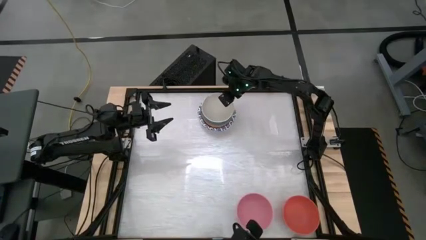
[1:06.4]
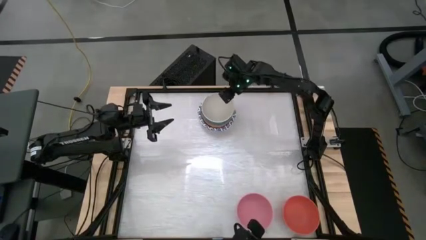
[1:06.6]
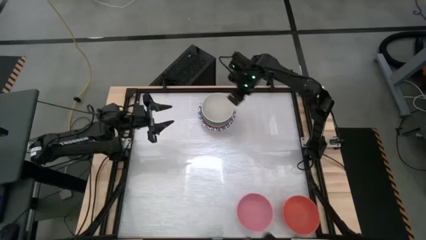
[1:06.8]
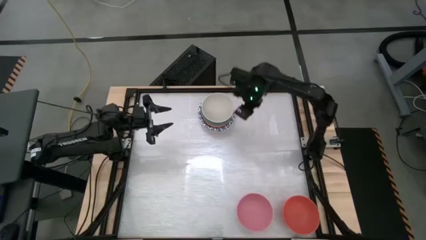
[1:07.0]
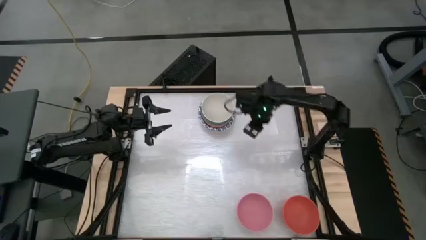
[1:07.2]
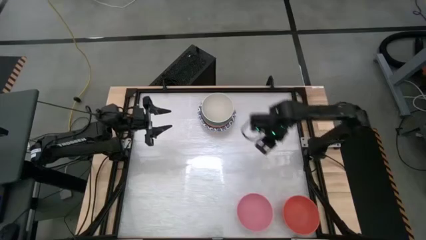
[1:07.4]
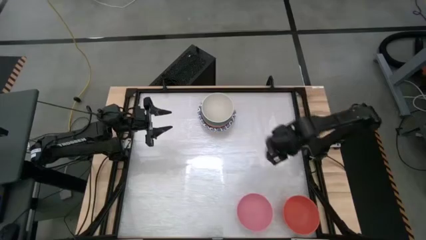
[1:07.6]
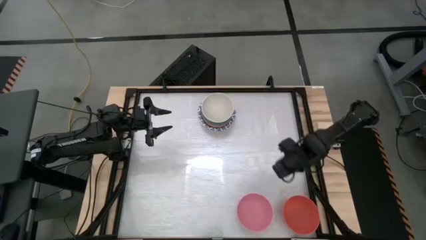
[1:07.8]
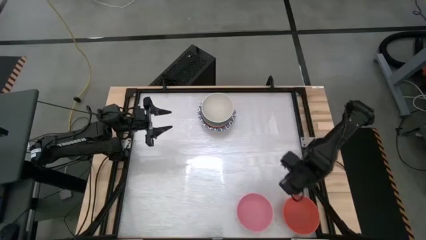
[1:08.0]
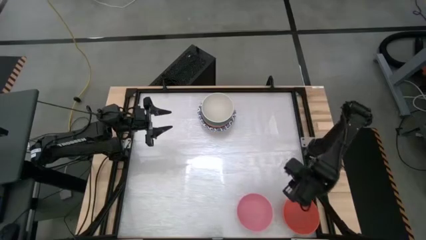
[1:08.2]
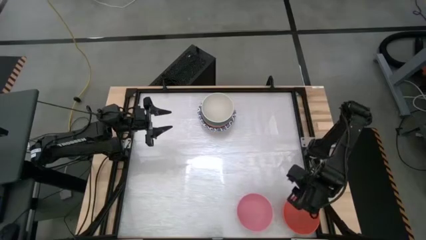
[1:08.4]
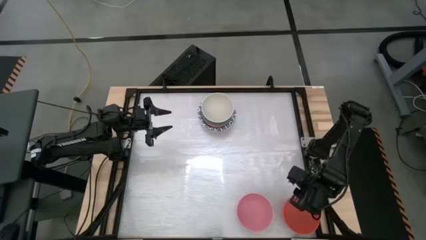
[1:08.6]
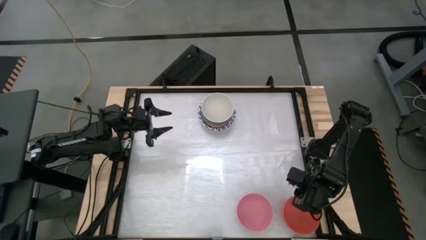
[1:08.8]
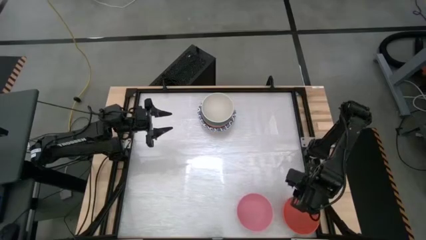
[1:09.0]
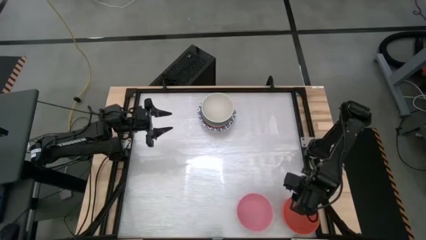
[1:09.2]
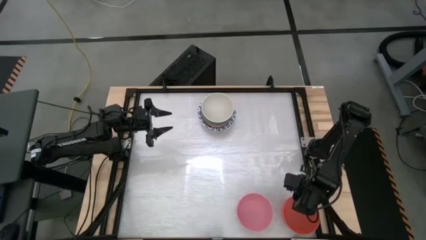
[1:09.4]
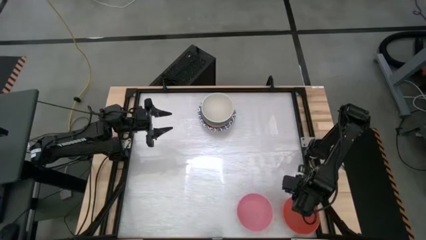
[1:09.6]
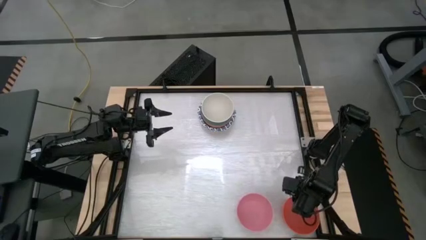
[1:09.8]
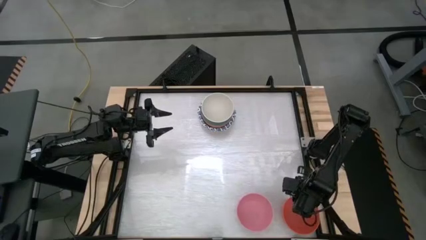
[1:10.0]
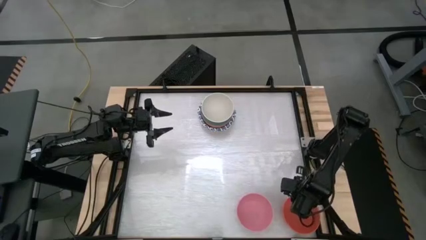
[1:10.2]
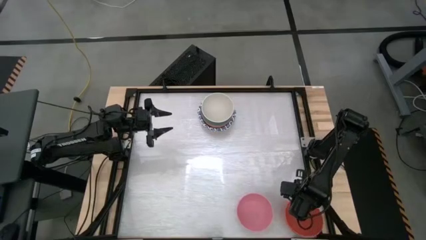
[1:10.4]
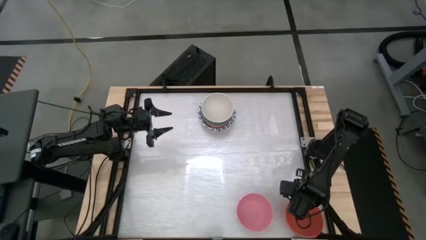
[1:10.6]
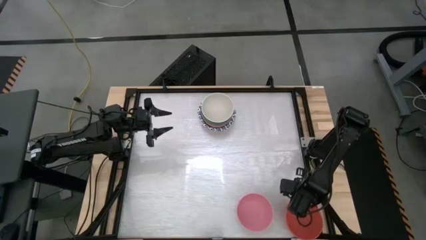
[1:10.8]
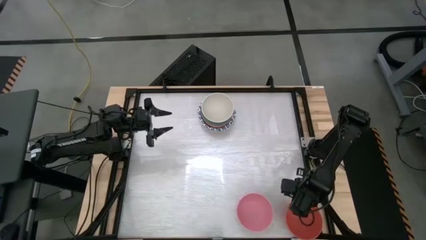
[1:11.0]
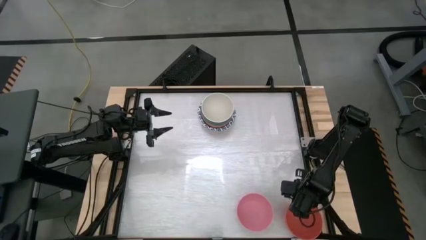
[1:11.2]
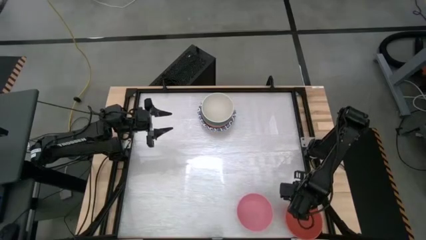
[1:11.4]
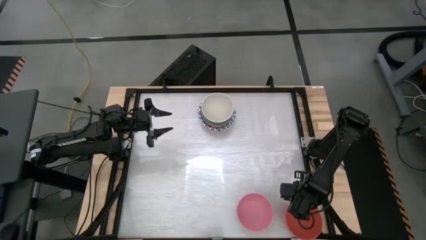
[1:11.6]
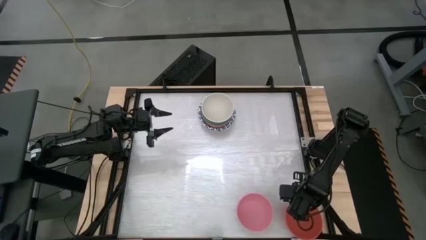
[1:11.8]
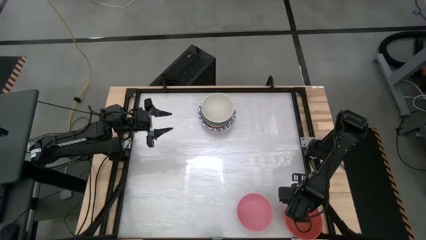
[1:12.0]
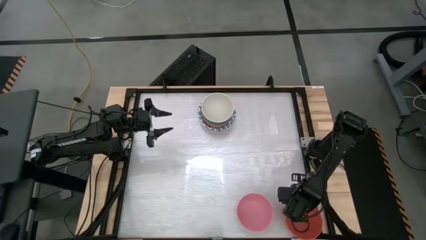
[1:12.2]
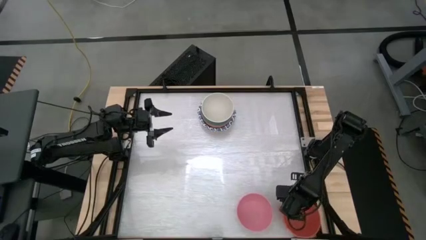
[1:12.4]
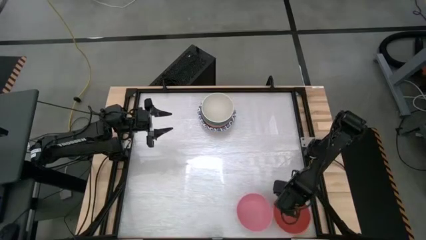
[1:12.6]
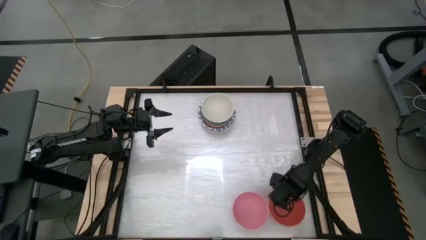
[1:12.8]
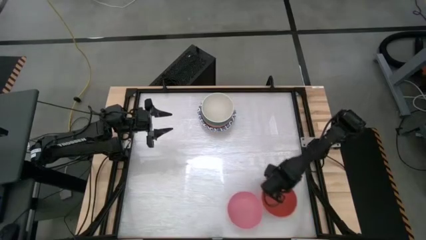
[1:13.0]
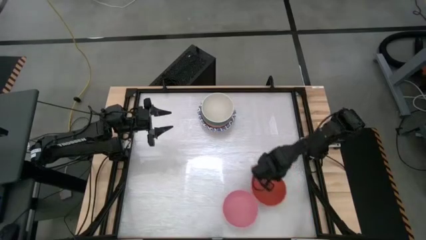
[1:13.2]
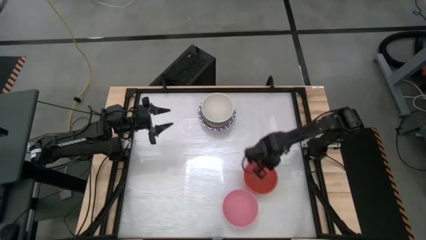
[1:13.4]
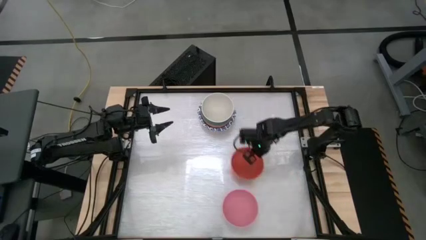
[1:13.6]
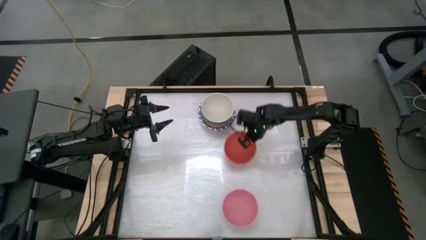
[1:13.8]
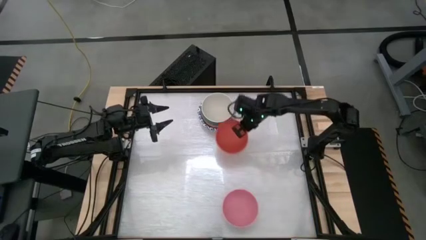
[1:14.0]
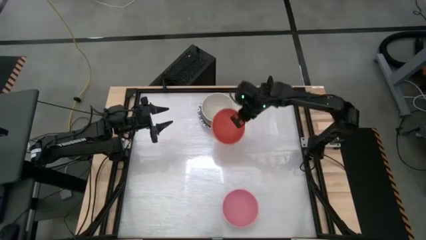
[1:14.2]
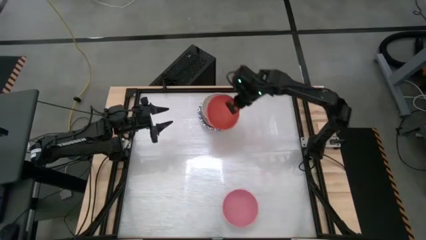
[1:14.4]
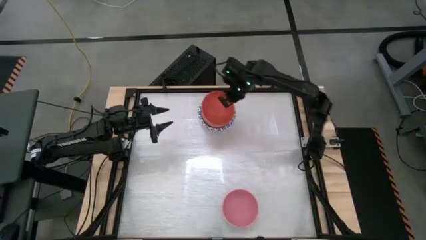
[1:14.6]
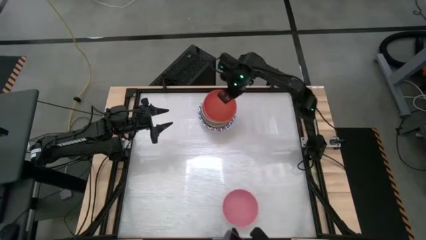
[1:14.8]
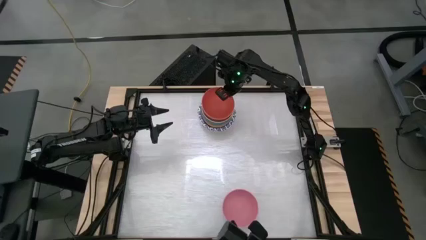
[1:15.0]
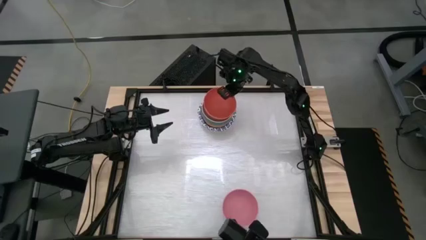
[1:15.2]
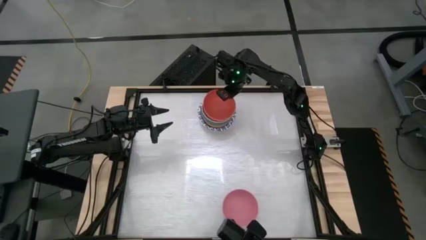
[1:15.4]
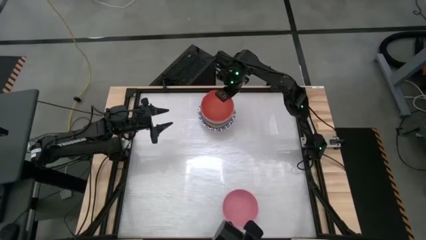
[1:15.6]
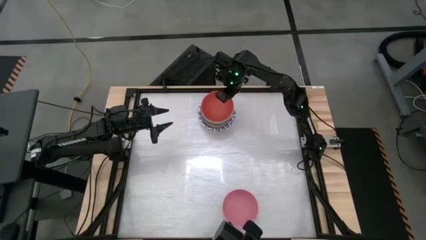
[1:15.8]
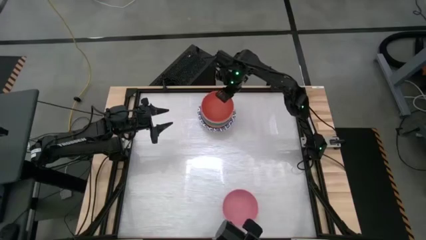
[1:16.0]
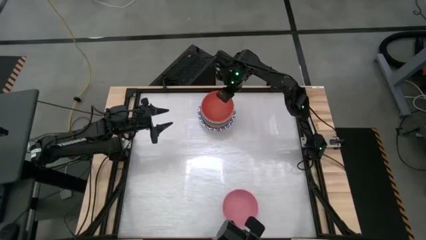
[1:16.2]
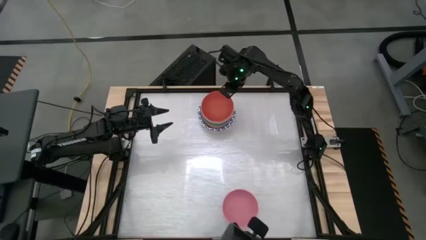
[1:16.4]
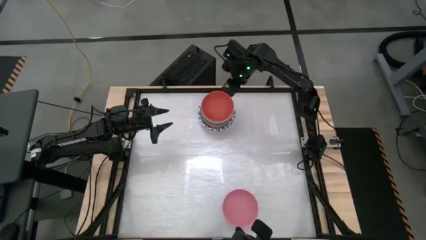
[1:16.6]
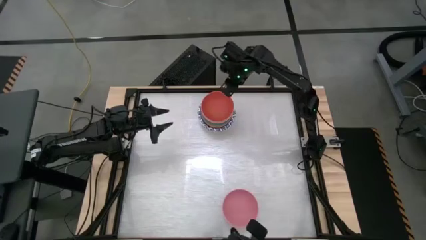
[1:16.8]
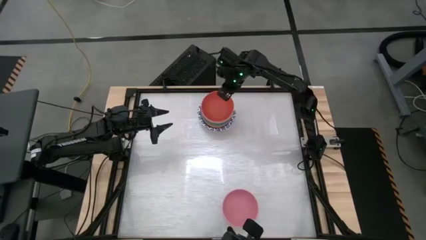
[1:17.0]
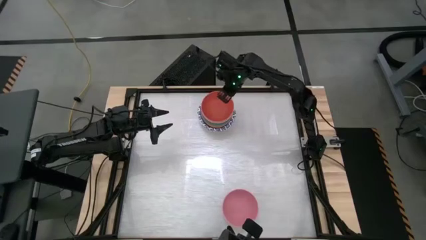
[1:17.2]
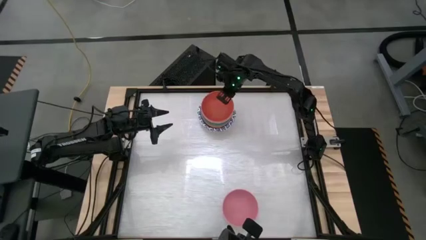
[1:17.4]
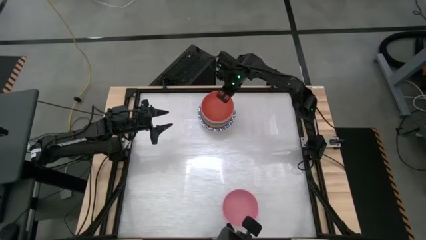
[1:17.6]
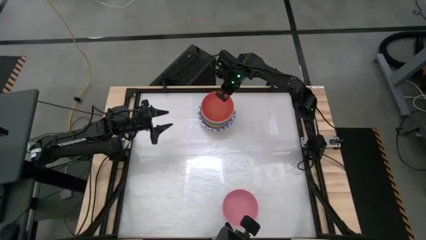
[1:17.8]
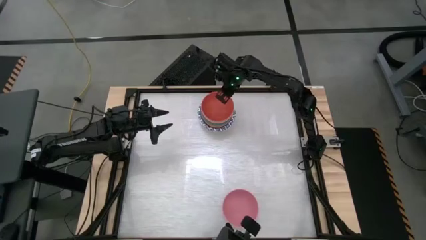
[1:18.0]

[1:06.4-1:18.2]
Stack the orange bowl on top of the white bowl

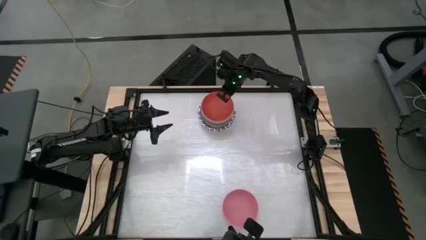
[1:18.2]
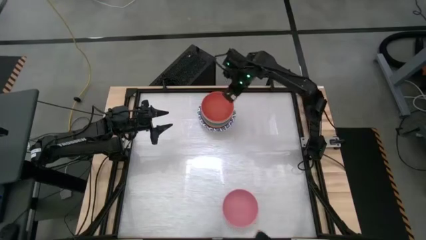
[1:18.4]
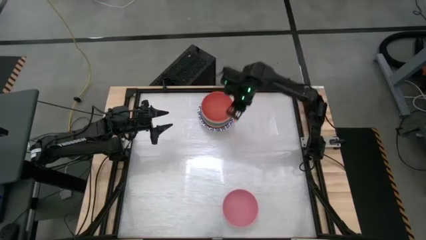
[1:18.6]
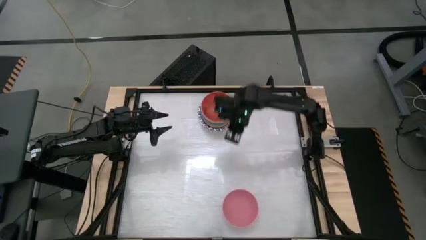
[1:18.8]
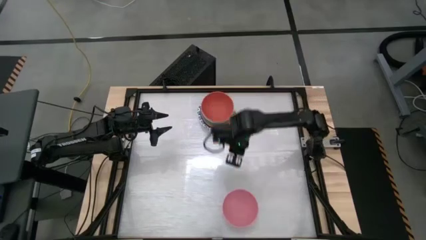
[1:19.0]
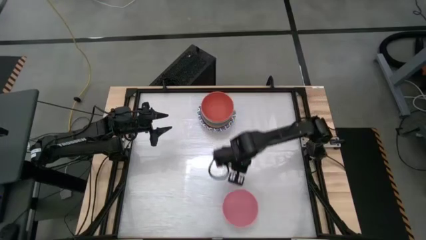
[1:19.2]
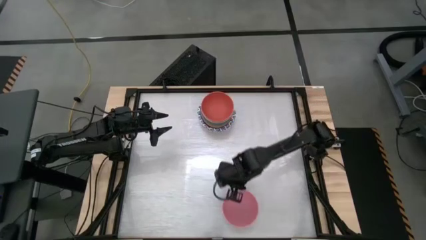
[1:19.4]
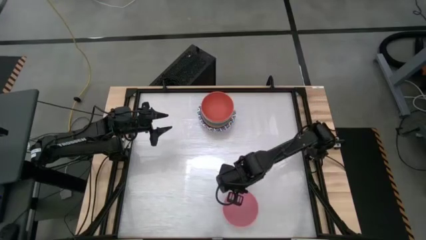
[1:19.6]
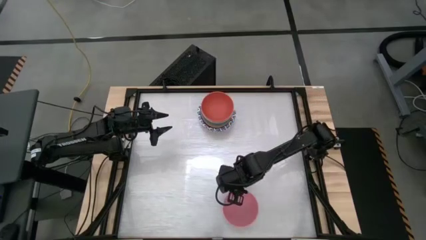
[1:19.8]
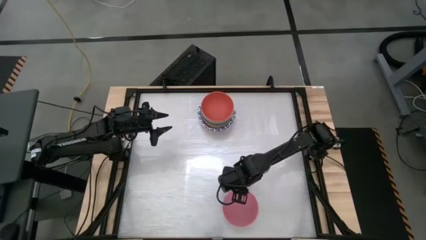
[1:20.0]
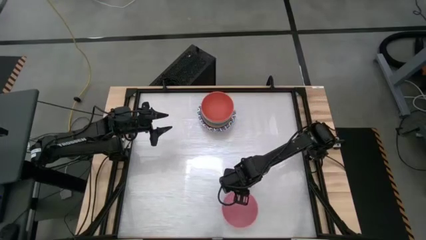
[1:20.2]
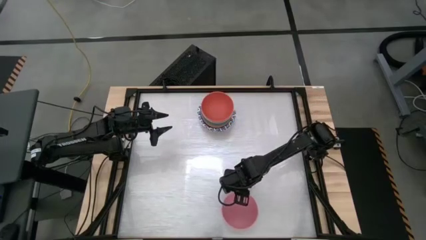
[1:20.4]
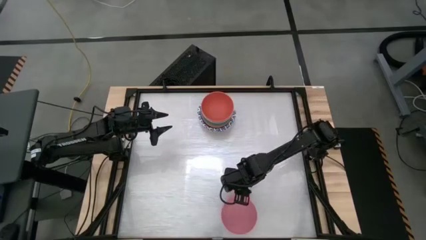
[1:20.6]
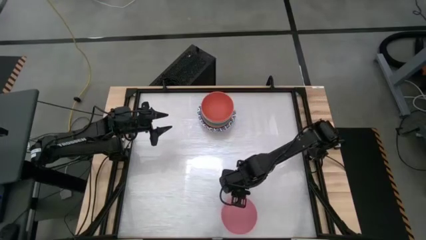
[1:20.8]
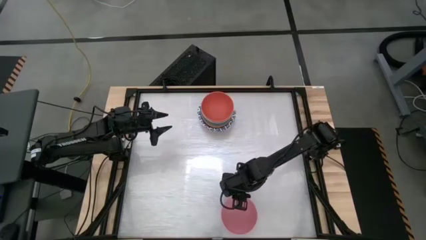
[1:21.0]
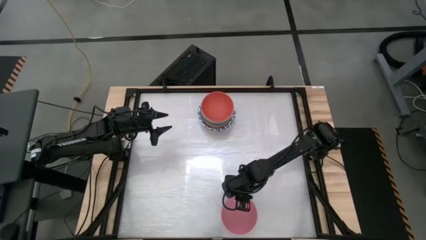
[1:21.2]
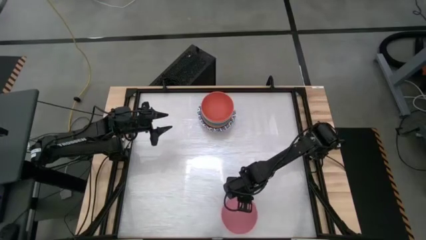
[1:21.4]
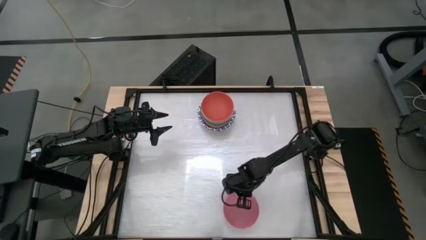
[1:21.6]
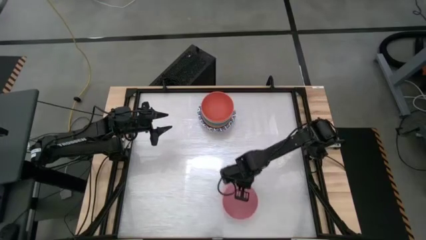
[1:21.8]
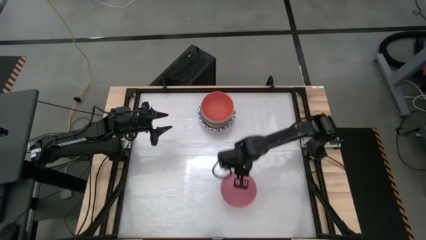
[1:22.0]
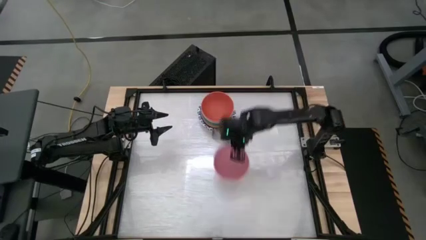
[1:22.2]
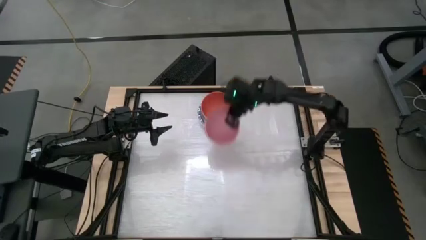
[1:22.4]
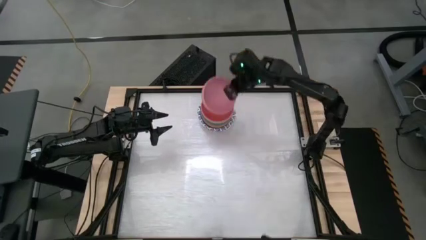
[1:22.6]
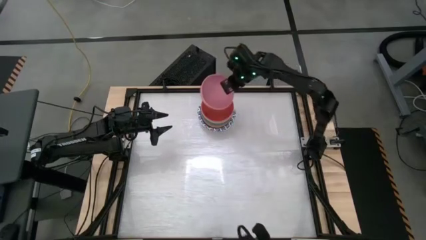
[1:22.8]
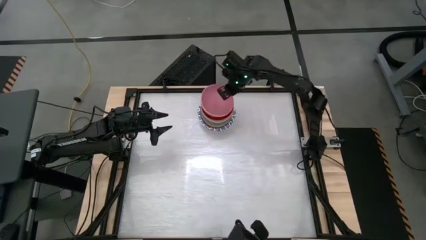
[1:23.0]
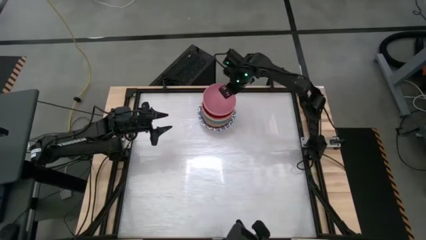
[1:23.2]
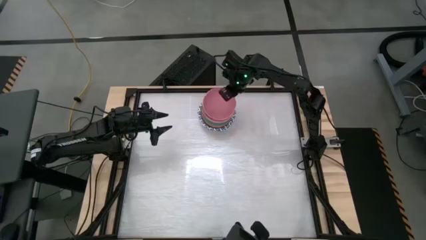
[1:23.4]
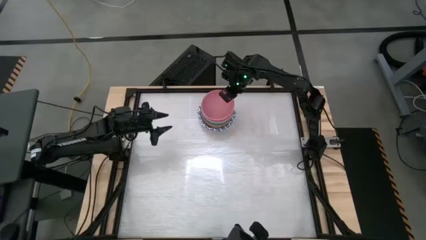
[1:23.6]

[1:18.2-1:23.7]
Stack the pink bowl on top of the orange bowl
